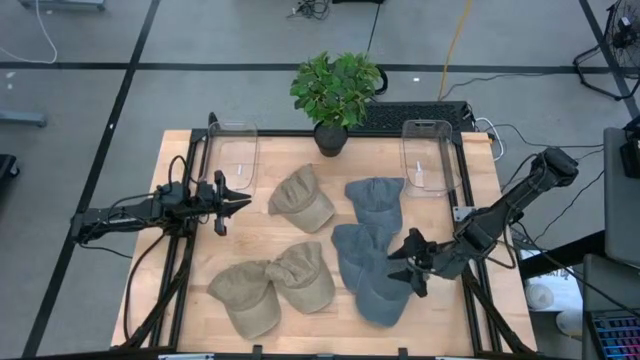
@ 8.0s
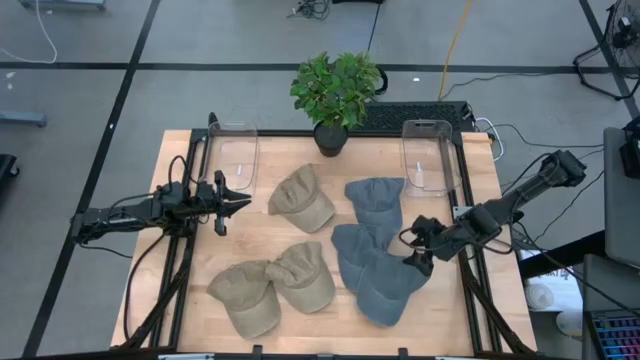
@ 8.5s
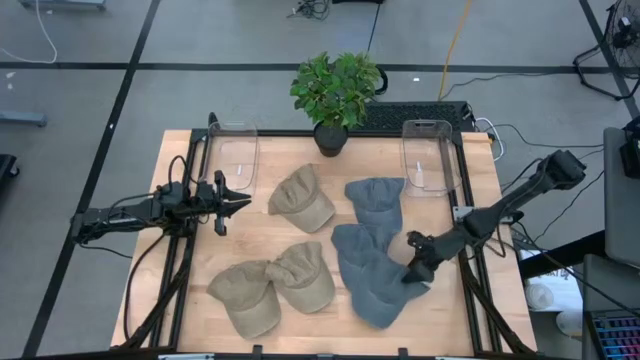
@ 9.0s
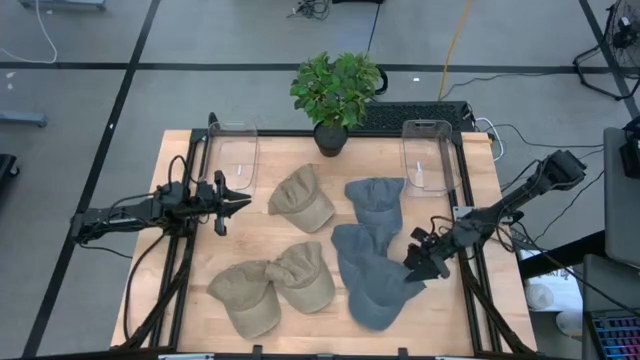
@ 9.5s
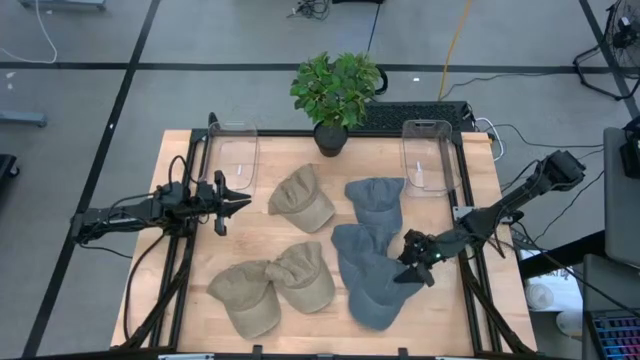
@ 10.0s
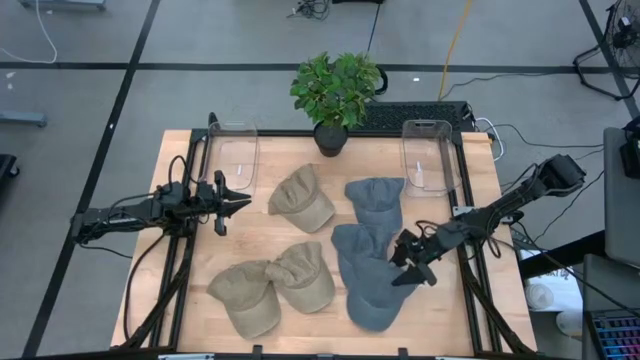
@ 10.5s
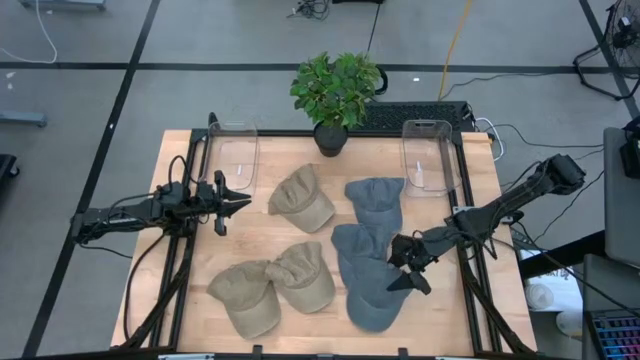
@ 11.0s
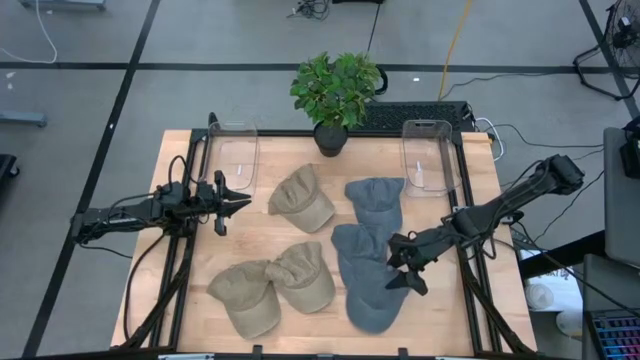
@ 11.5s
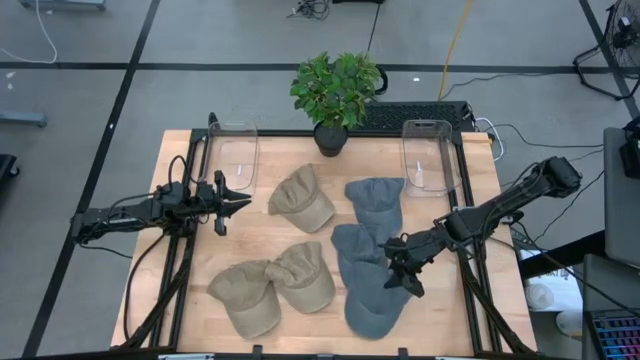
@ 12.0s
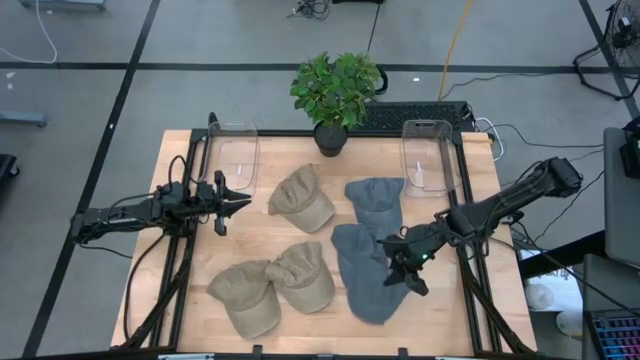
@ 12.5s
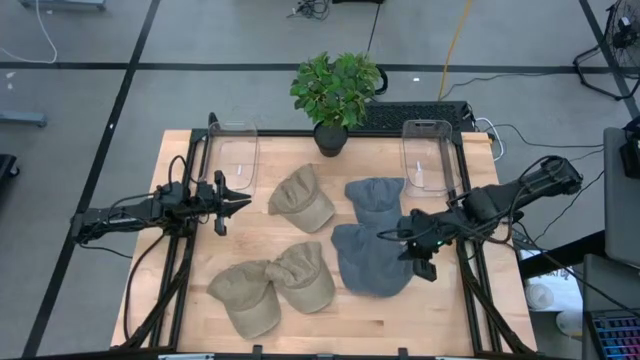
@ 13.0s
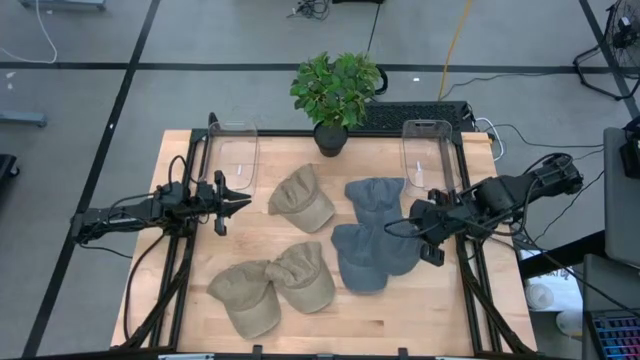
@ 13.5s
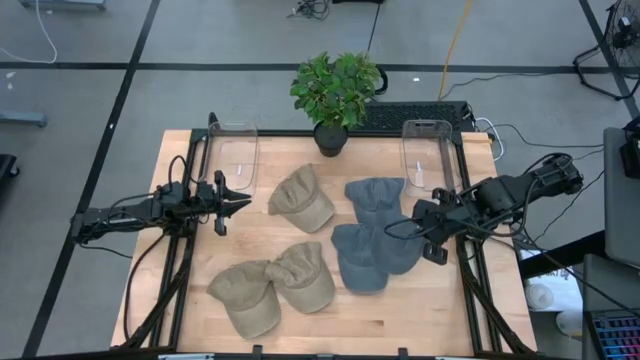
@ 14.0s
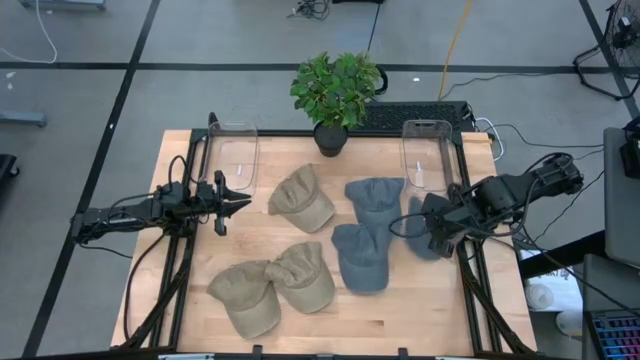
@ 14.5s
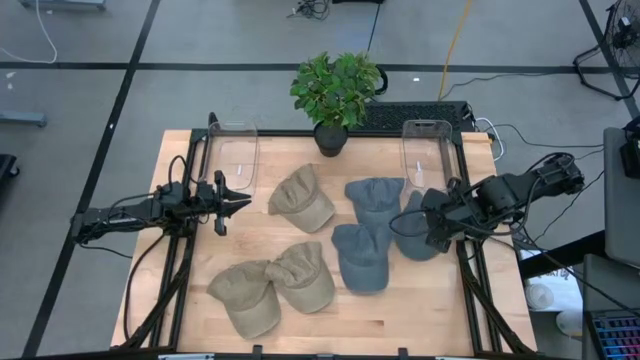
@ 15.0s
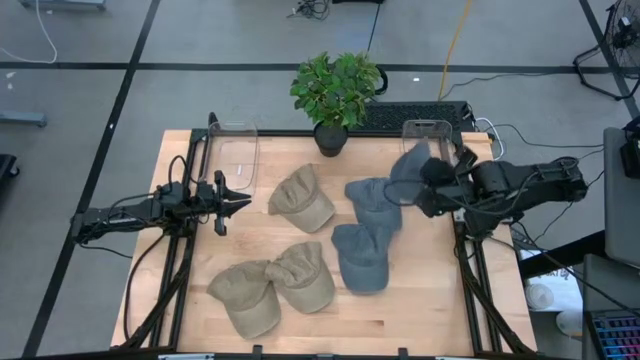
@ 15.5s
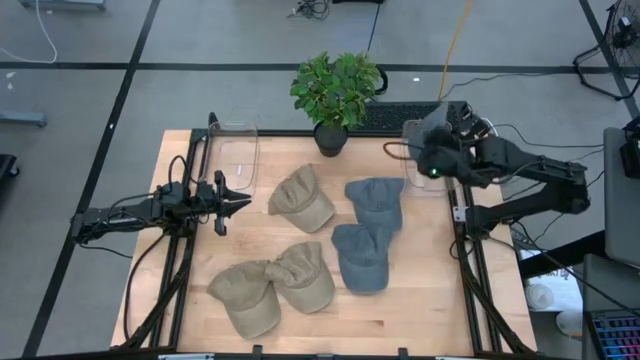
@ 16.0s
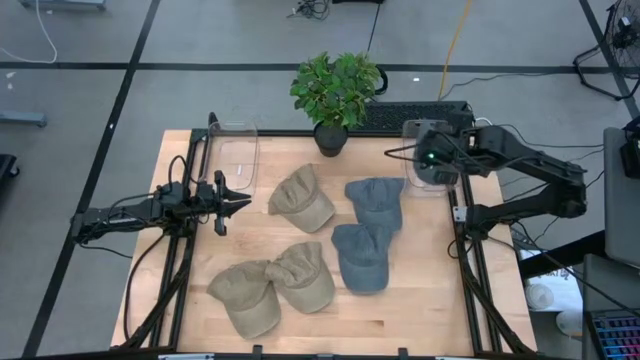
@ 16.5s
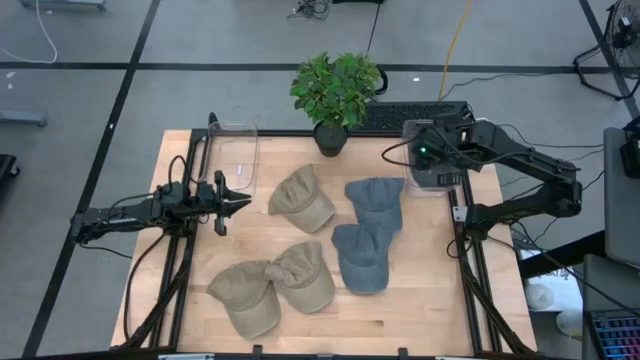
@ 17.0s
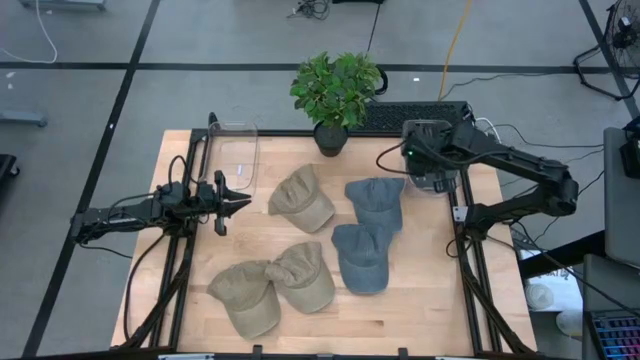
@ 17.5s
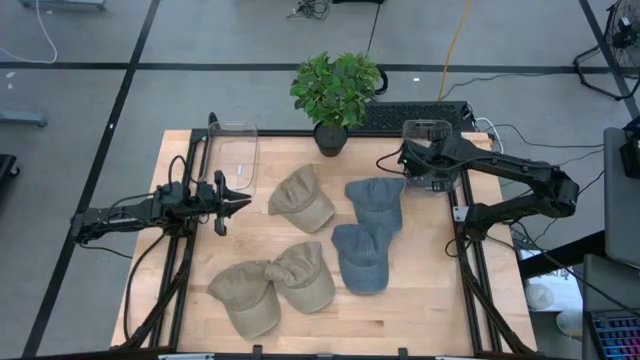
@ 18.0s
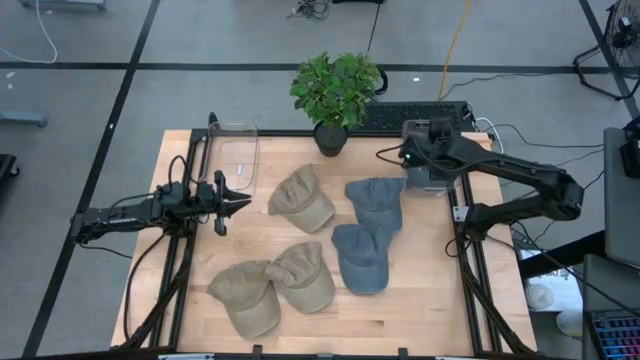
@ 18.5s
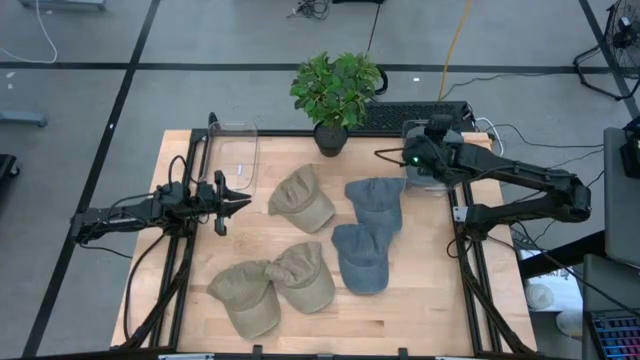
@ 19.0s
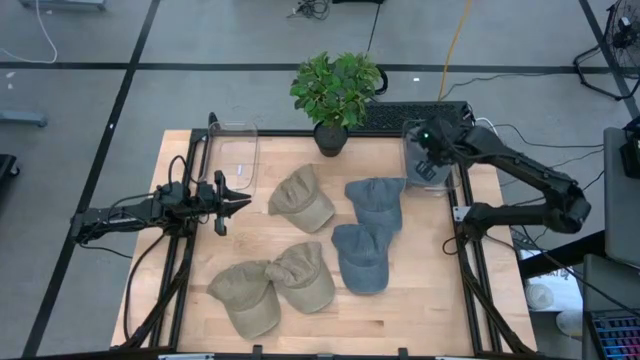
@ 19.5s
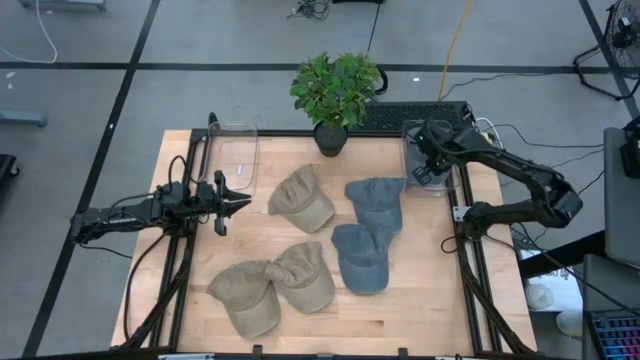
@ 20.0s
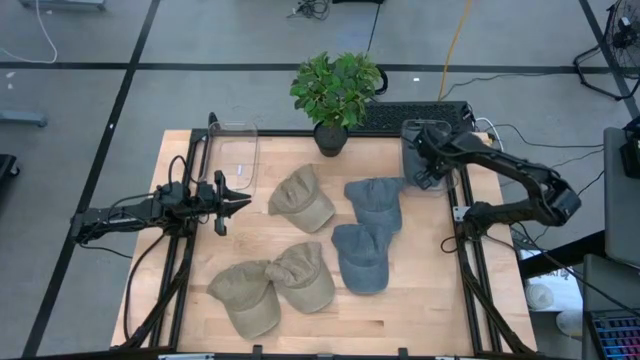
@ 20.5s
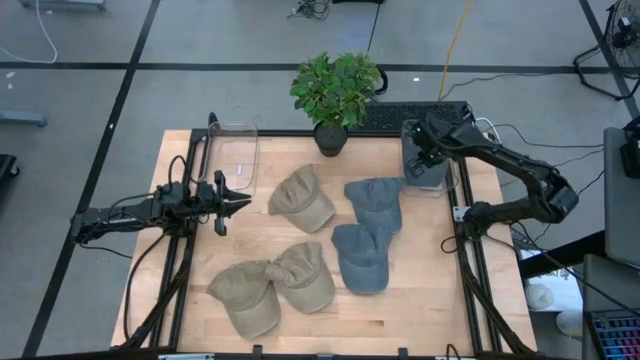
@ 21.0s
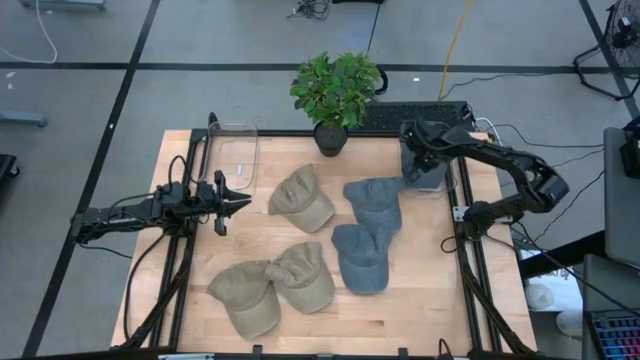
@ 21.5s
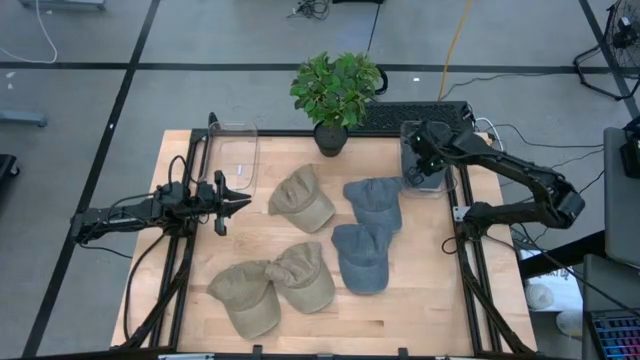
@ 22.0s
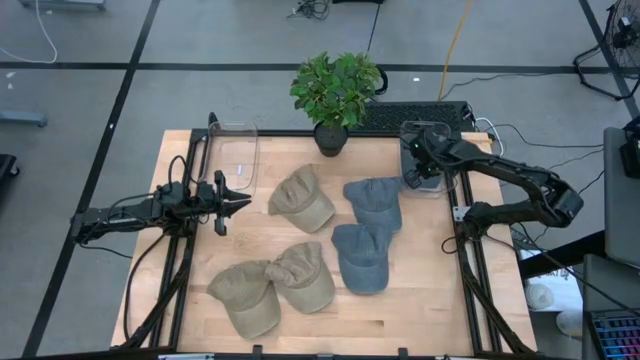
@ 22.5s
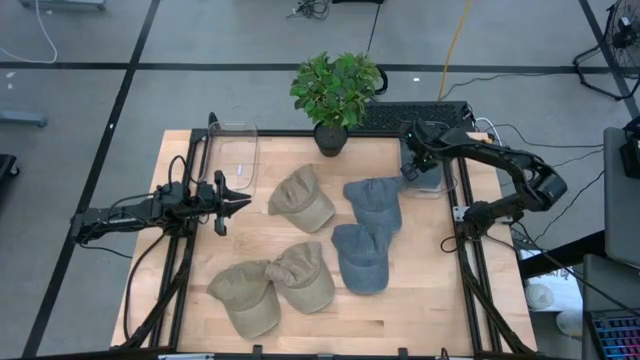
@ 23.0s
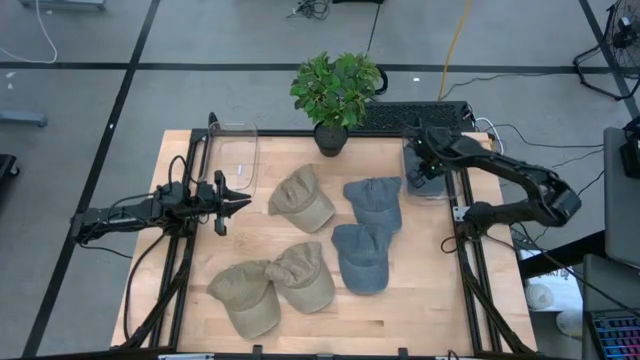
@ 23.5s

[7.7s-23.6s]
Task: Pick & Place hat
Put the bottom blue cap into the right transparent bin

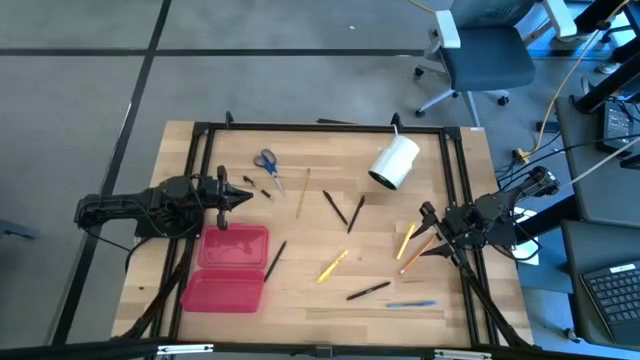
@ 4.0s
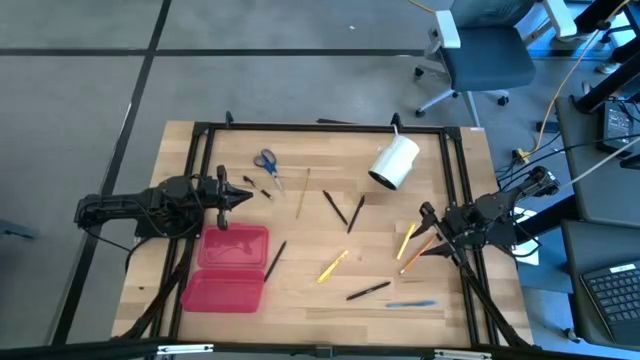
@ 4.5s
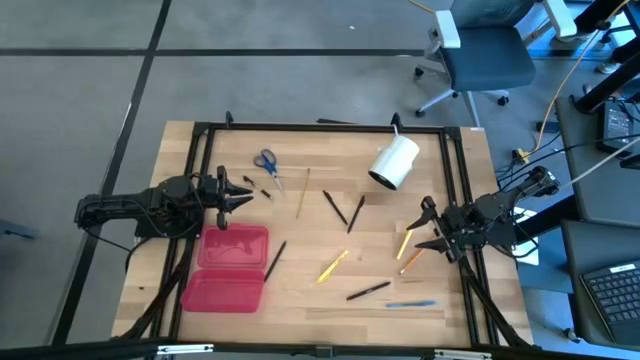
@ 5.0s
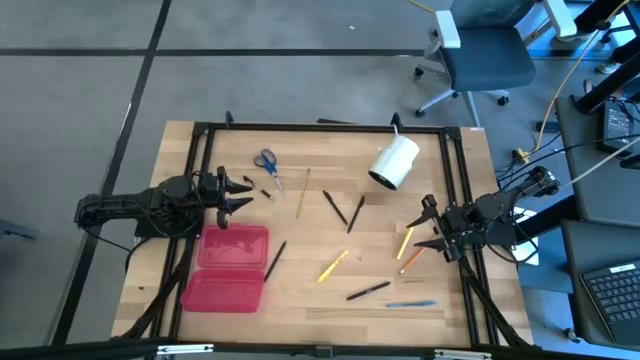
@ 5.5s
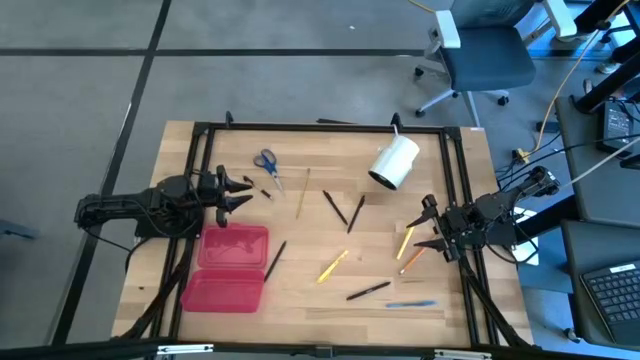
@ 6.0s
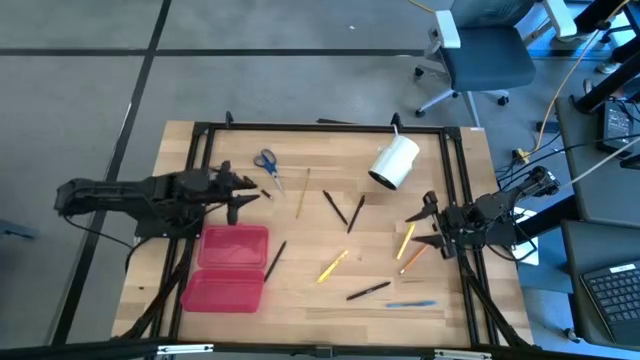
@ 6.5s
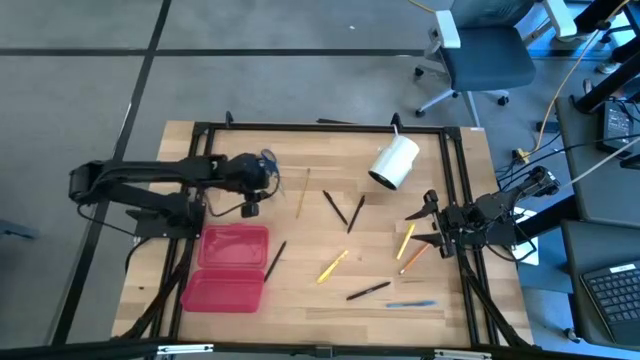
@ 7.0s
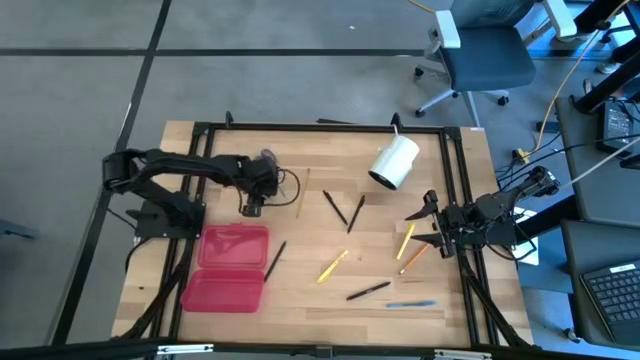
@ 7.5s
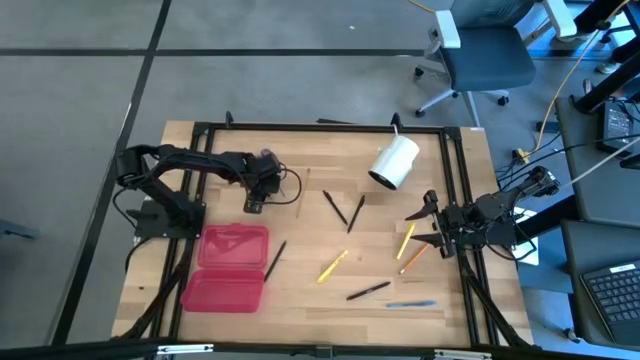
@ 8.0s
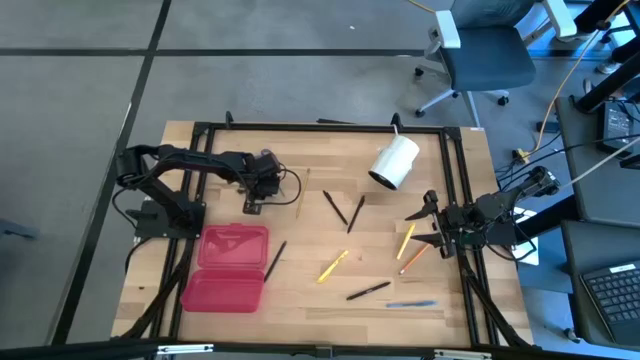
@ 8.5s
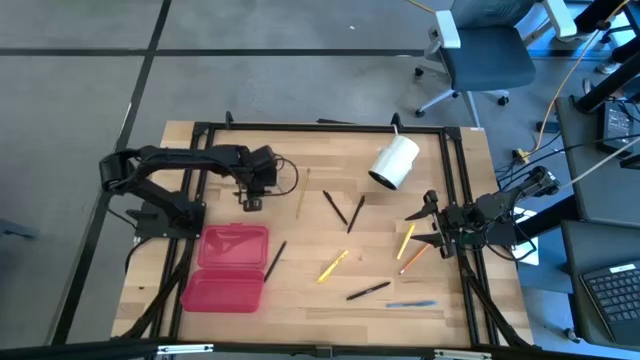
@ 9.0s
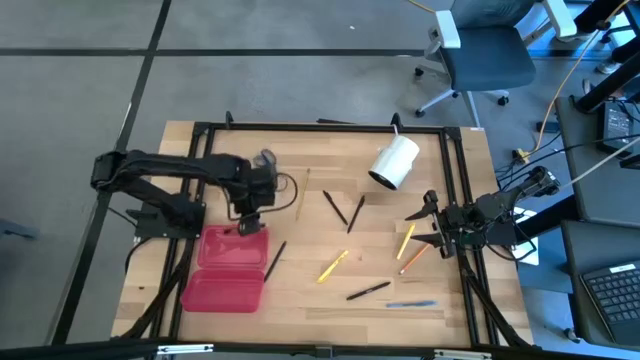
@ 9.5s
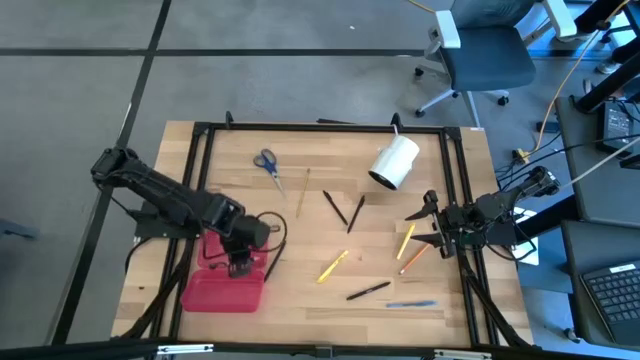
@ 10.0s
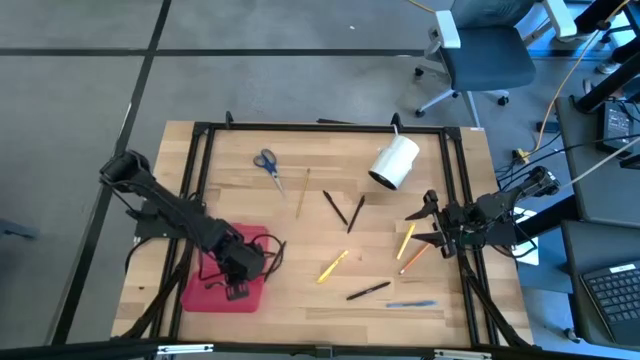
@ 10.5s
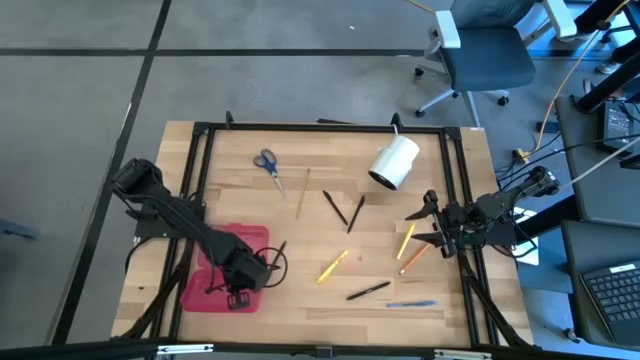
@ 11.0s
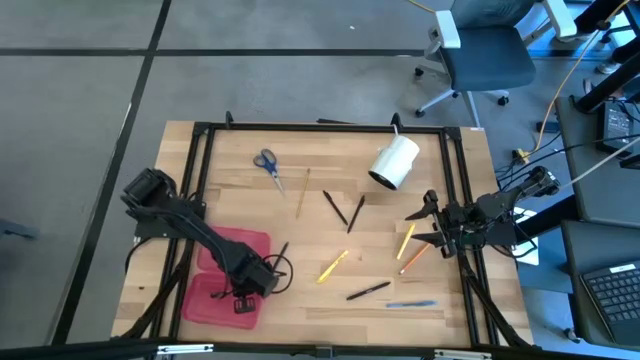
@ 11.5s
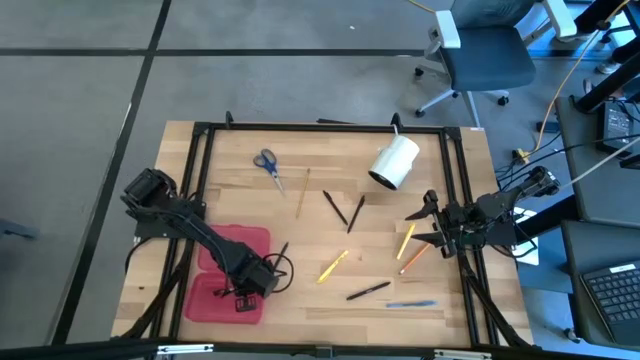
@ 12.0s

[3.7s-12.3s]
Task: Pick & place school supplies into a supply box
Put the black pen into the red supply box
